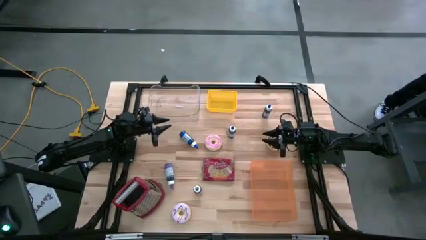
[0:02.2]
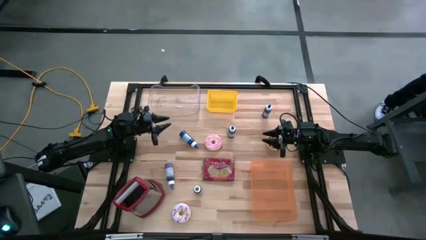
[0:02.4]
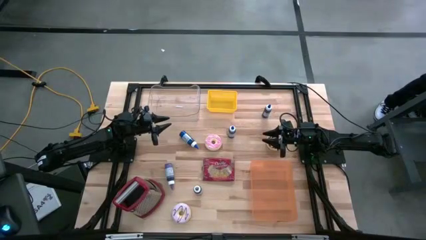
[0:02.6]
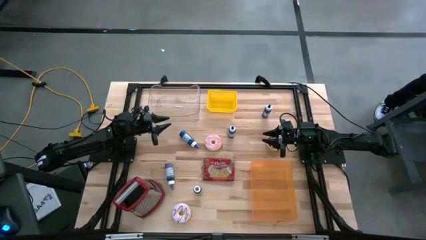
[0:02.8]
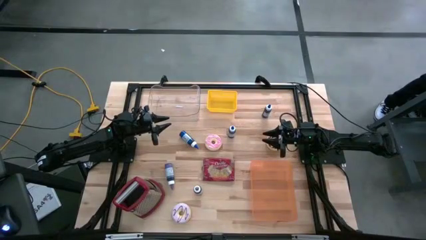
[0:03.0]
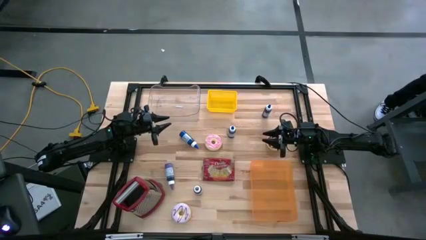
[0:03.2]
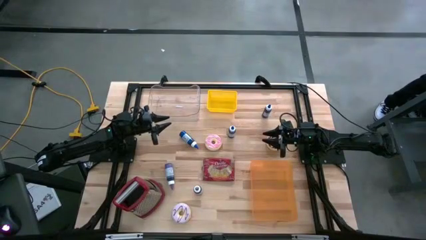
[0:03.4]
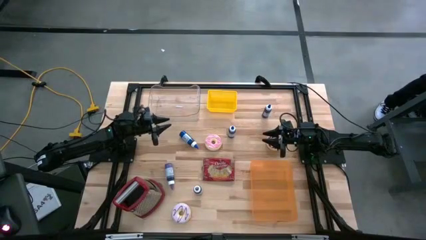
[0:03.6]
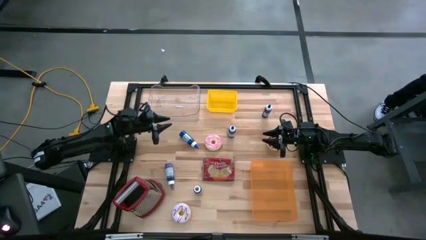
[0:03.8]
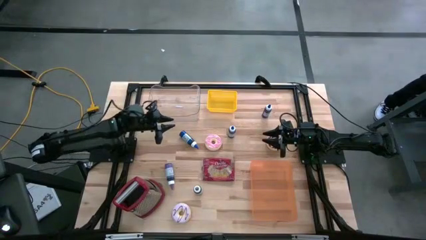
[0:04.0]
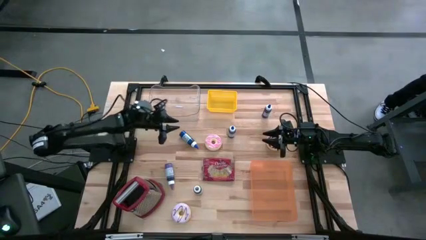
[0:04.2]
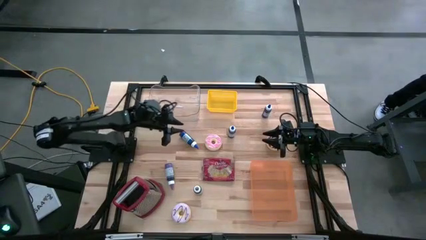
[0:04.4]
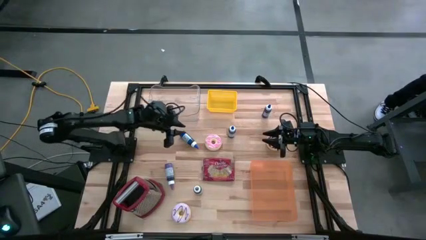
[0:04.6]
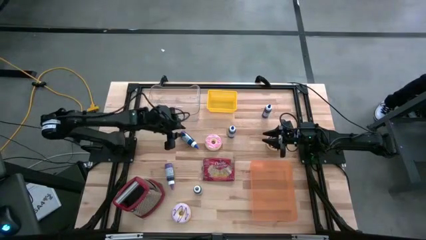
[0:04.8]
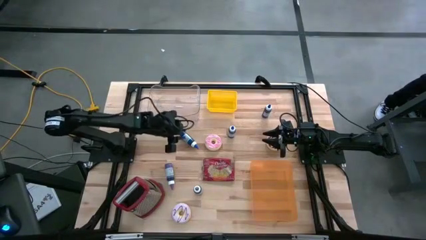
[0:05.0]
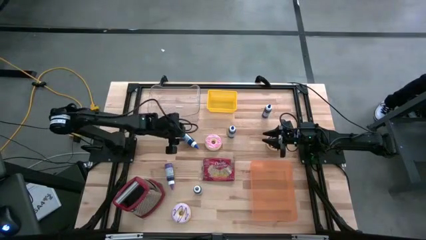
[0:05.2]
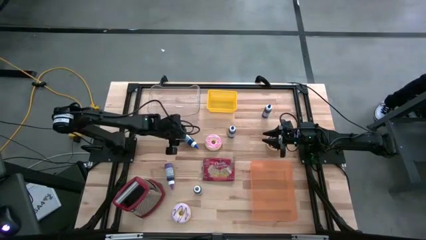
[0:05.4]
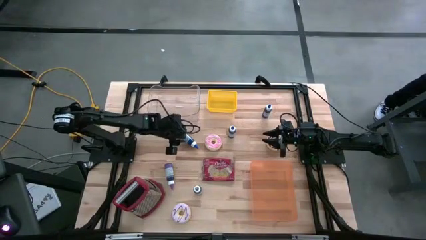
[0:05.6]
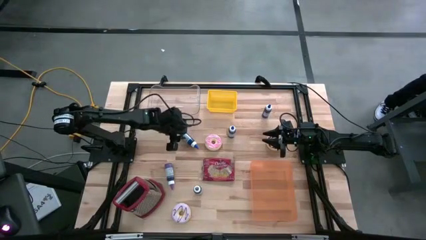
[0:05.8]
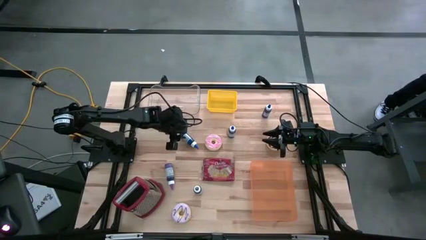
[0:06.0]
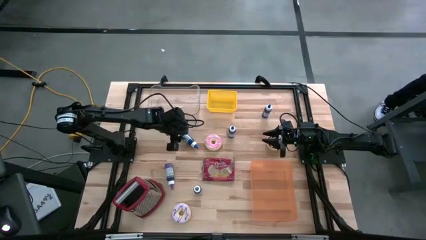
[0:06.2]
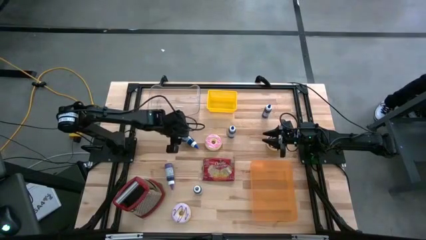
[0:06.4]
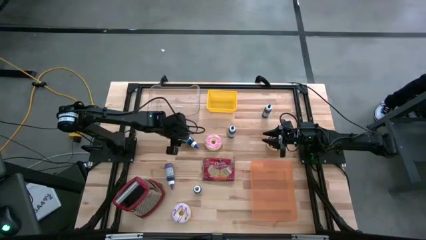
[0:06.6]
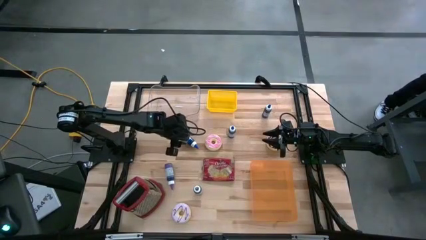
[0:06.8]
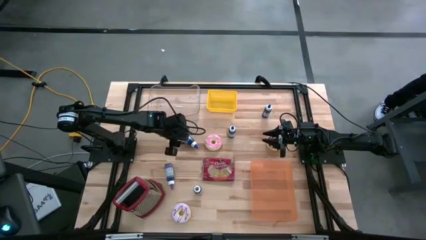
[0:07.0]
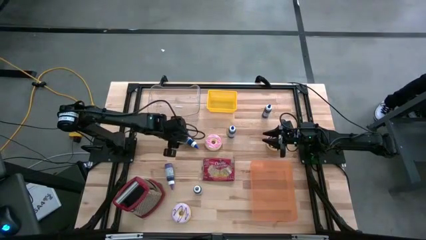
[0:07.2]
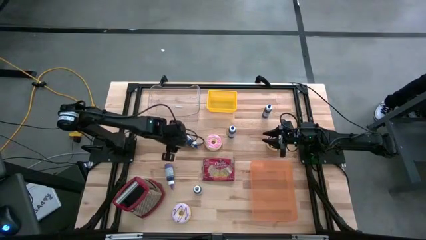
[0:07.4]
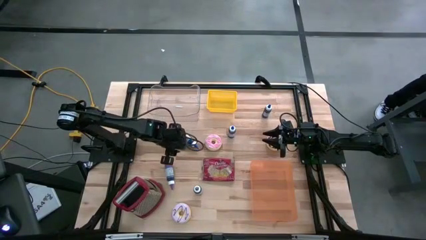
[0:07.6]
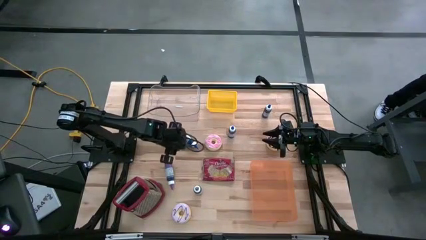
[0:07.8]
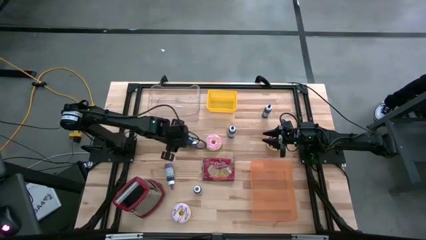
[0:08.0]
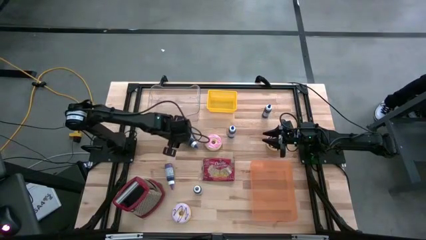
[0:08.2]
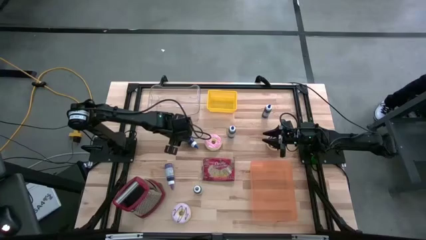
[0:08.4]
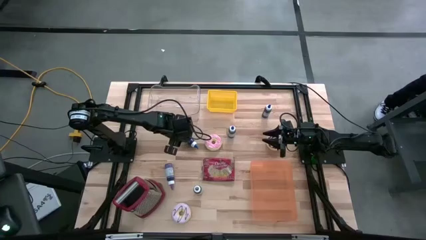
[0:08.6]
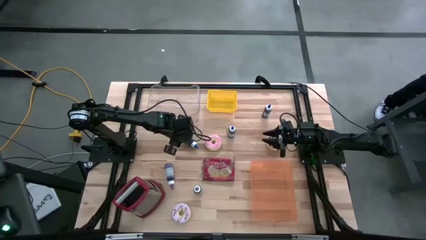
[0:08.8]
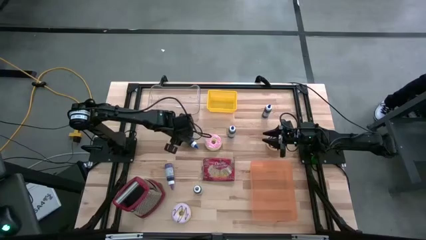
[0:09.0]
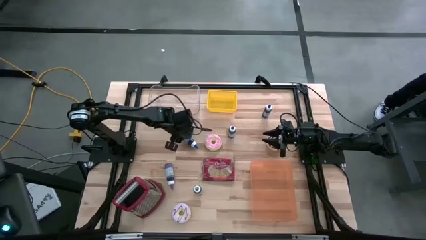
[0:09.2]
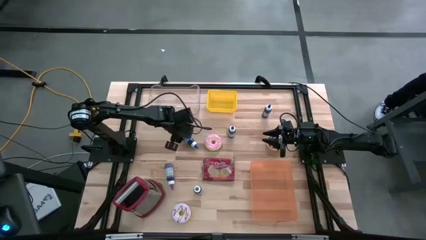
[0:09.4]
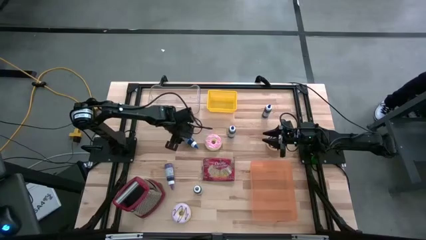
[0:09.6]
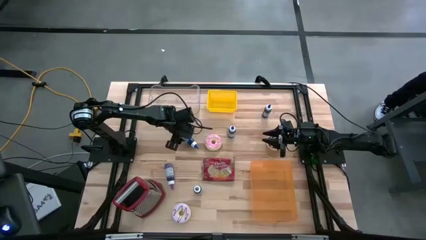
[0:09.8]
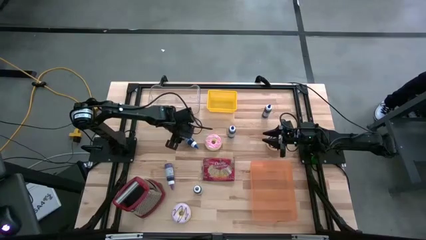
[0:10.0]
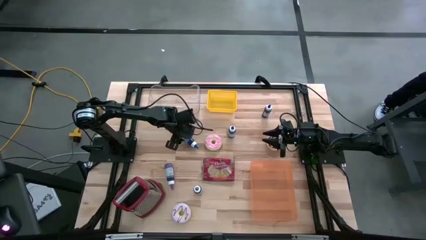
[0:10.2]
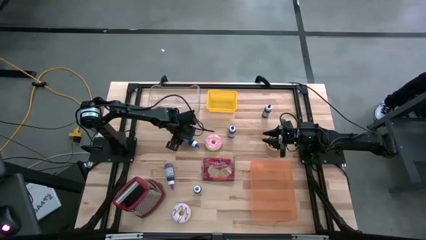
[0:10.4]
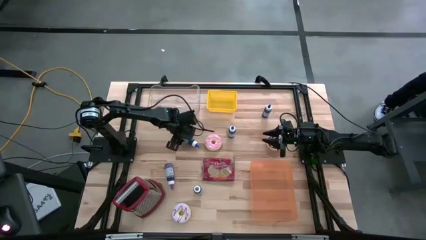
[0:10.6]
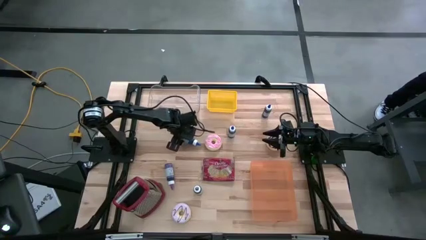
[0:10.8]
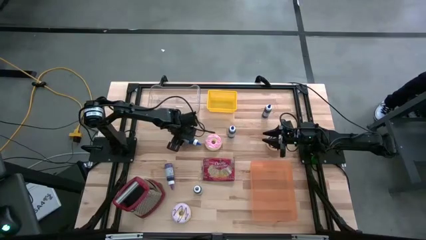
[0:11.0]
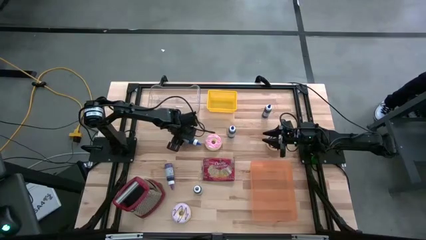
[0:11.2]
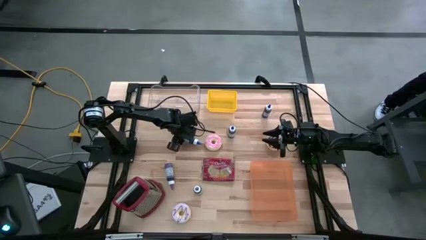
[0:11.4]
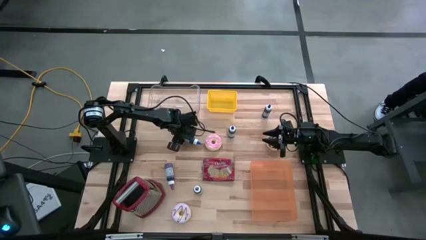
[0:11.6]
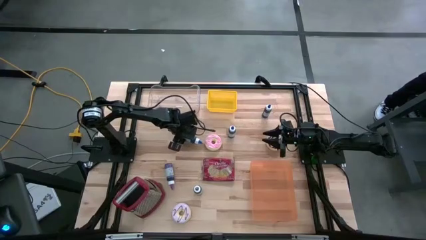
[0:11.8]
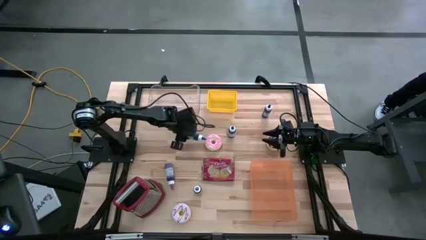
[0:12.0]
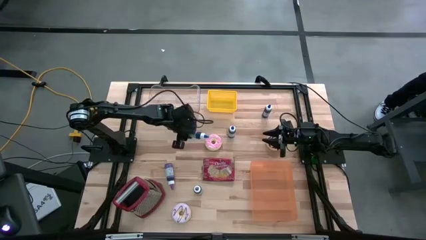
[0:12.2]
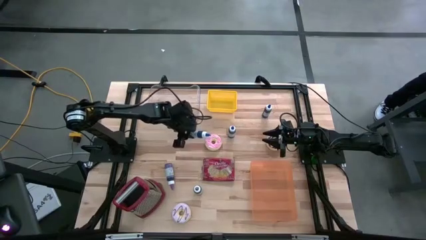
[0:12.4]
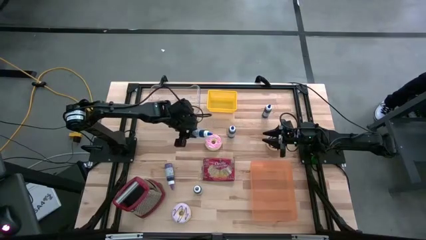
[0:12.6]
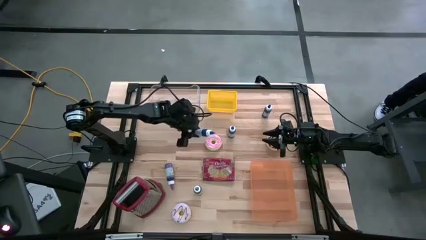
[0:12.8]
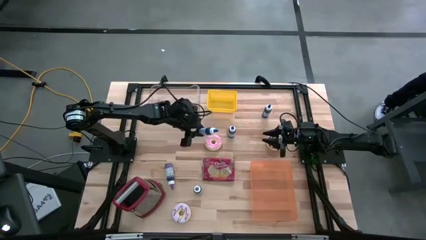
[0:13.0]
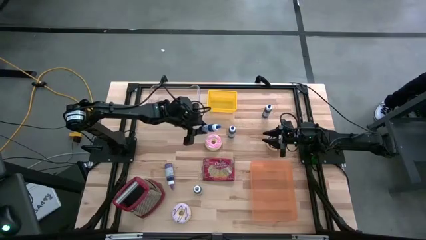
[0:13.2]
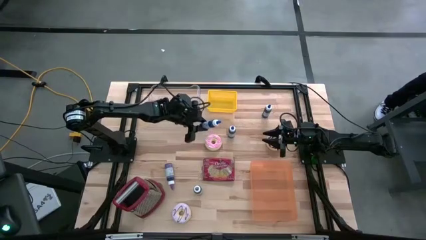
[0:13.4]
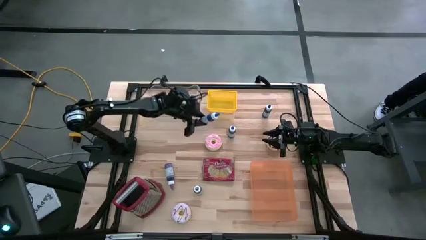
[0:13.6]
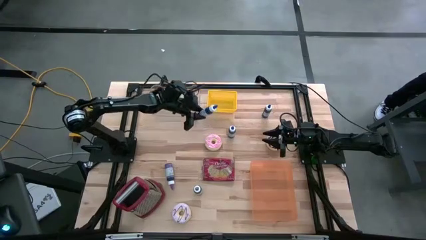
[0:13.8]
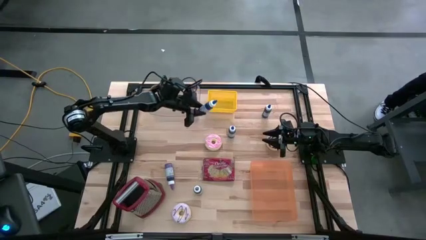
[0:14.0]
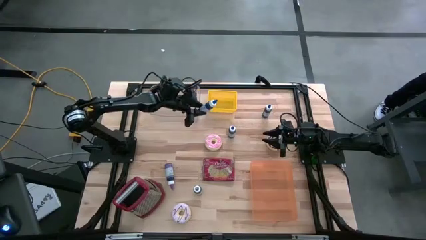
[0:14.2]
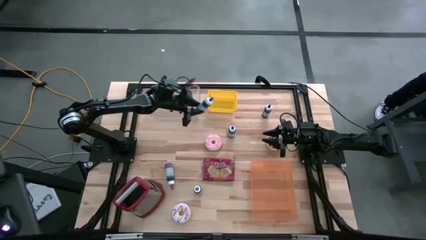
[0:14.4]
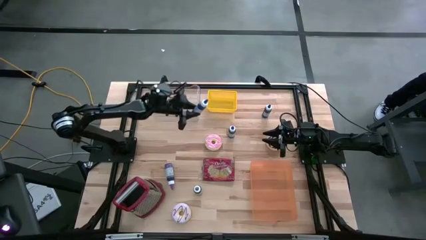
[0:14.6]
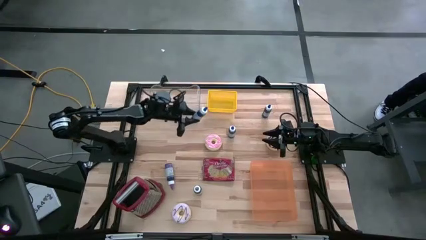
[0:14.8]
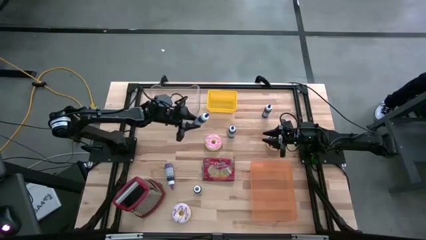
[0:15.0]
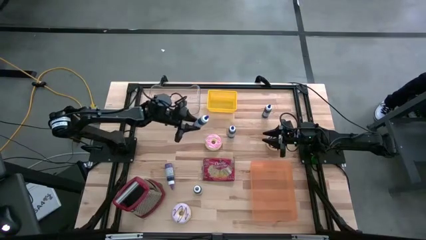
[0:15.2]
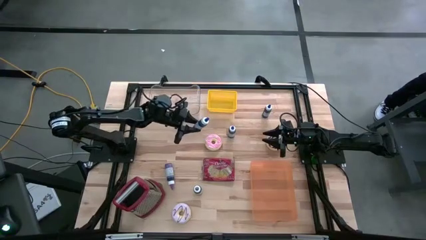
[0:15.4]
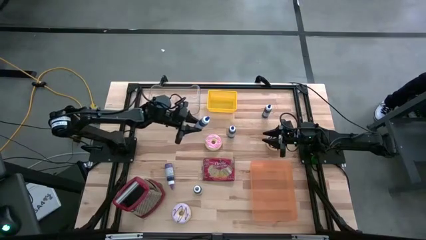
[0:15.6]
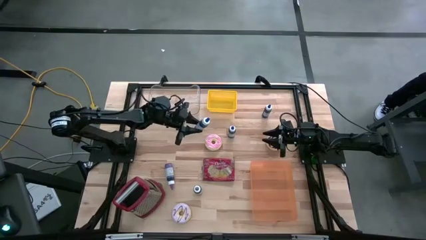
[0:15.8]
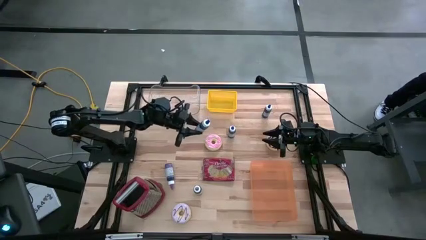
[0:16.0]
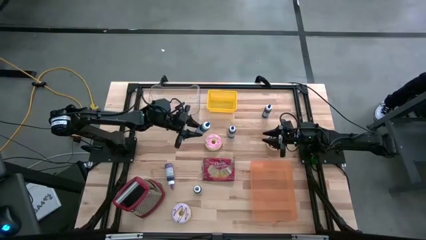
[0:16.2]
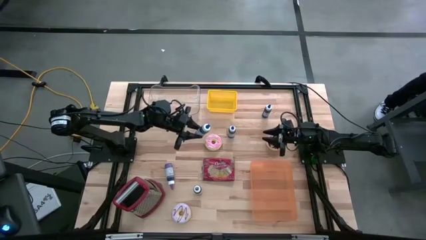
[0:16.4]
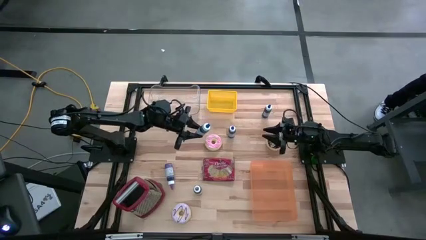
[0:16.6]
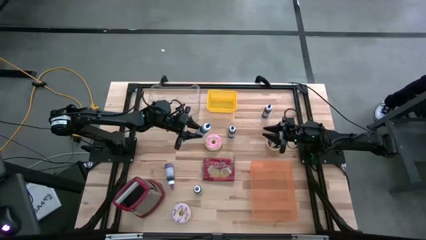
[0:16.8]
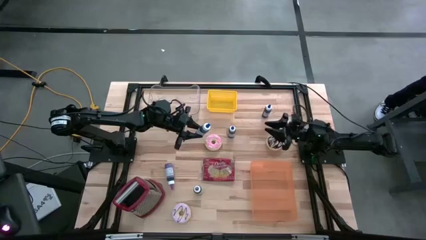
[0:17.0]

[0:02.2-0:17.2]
Put the left blue food coloring bottle into the transparent bin
